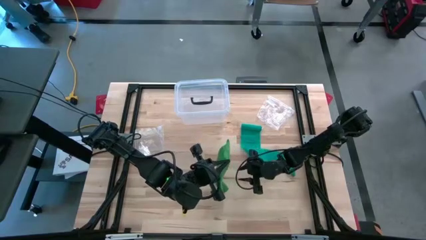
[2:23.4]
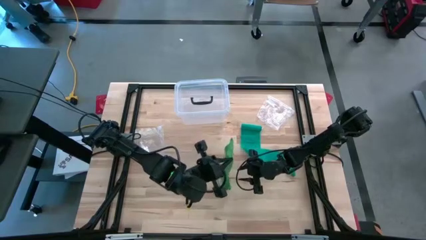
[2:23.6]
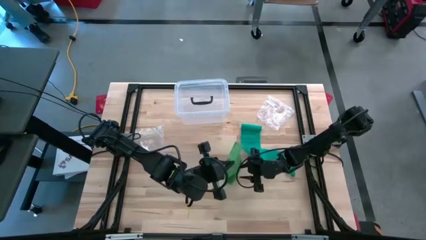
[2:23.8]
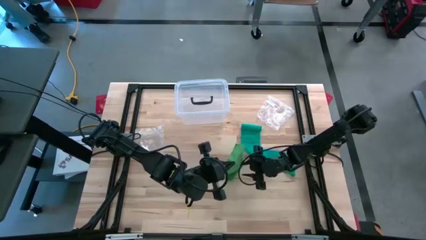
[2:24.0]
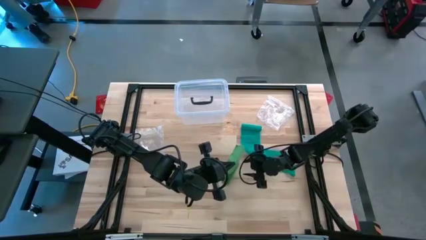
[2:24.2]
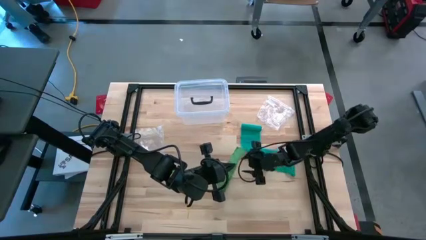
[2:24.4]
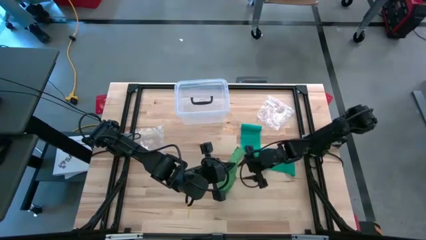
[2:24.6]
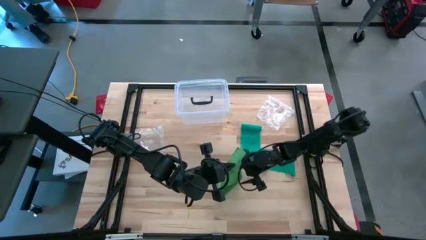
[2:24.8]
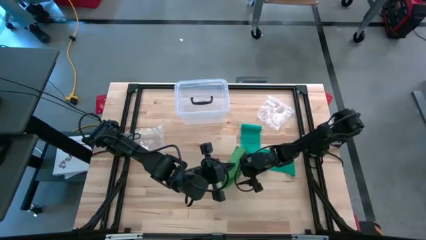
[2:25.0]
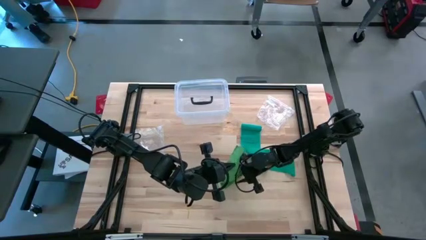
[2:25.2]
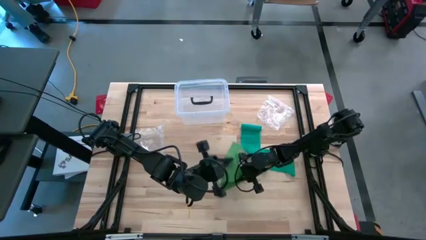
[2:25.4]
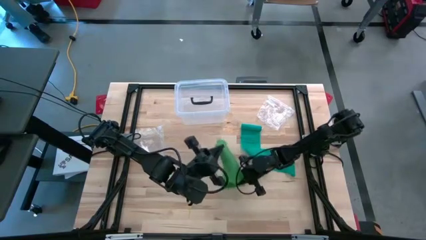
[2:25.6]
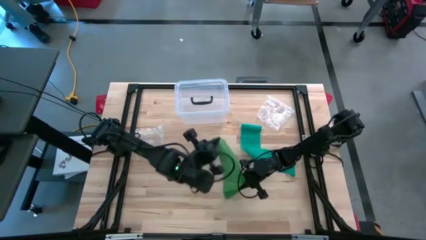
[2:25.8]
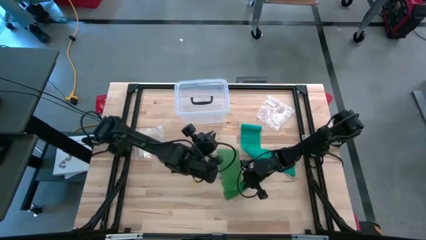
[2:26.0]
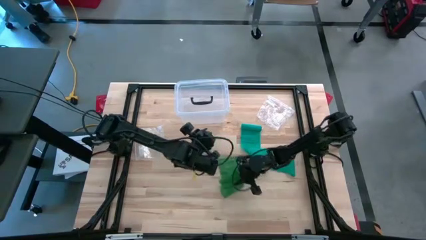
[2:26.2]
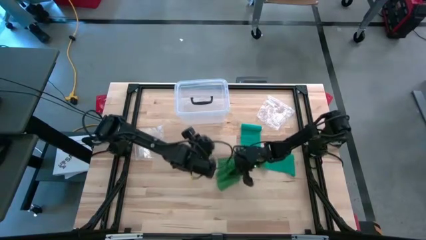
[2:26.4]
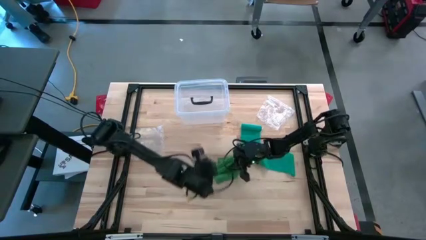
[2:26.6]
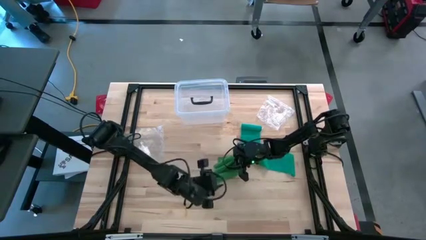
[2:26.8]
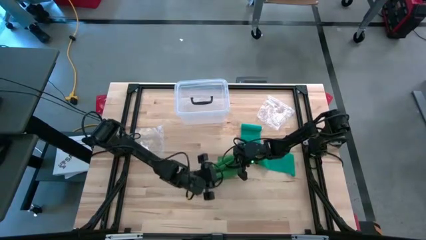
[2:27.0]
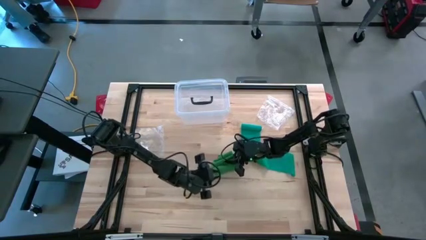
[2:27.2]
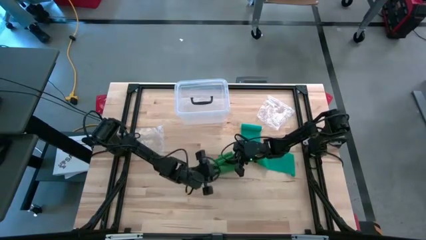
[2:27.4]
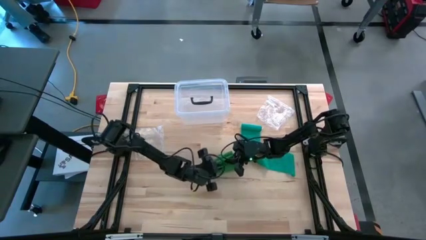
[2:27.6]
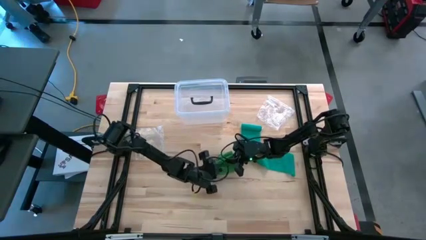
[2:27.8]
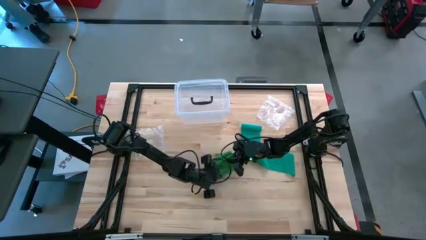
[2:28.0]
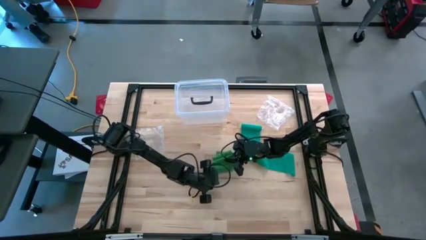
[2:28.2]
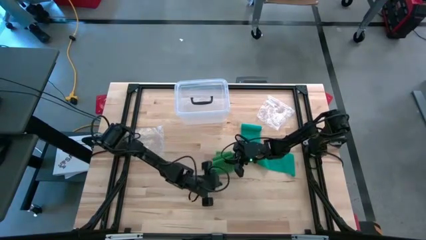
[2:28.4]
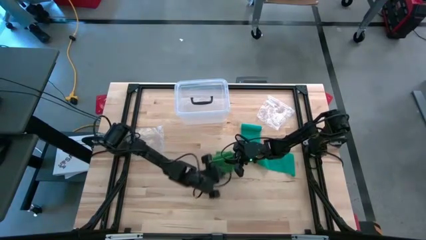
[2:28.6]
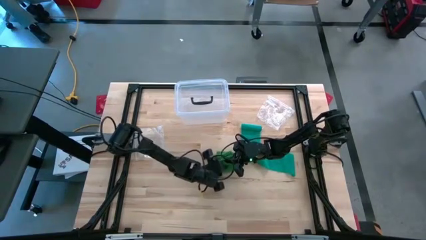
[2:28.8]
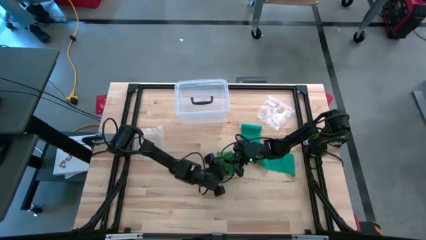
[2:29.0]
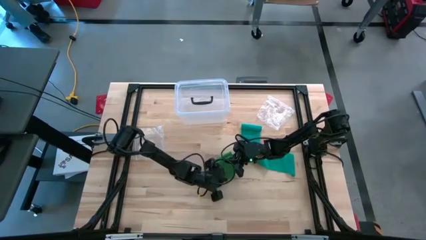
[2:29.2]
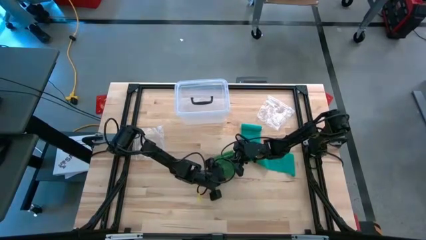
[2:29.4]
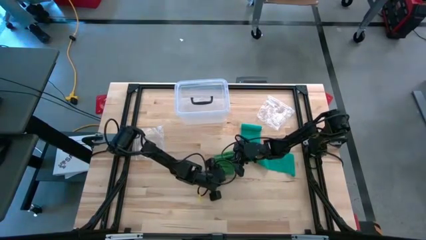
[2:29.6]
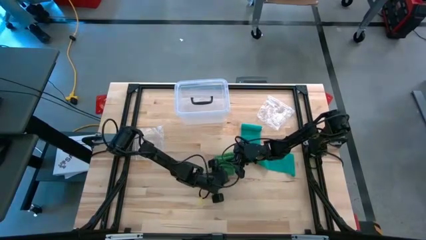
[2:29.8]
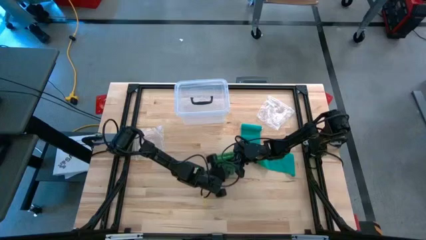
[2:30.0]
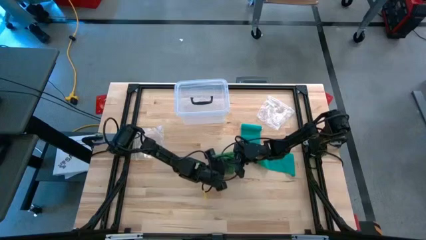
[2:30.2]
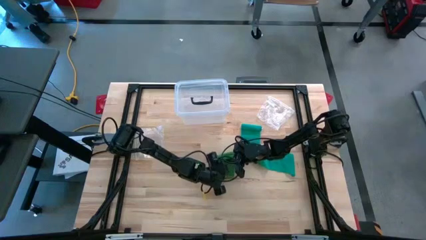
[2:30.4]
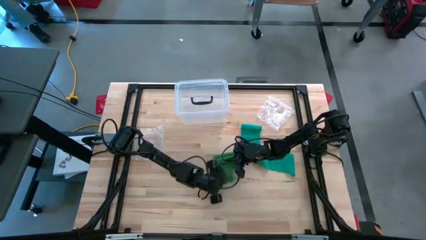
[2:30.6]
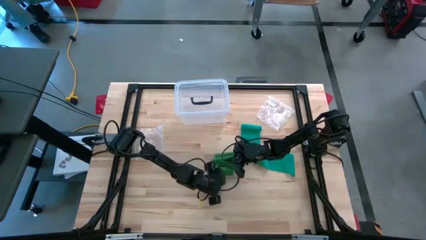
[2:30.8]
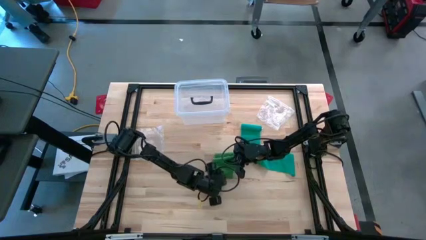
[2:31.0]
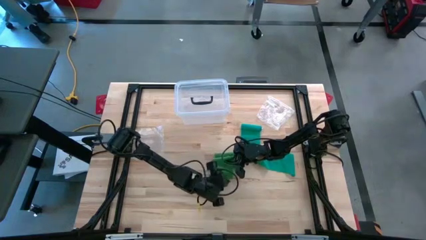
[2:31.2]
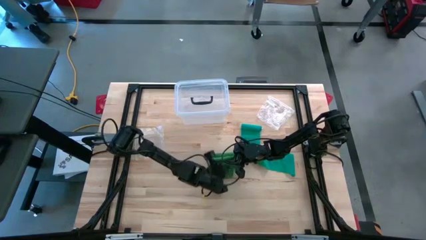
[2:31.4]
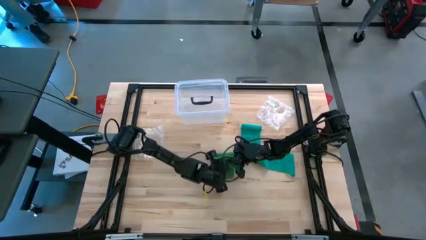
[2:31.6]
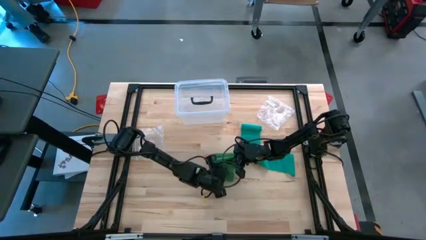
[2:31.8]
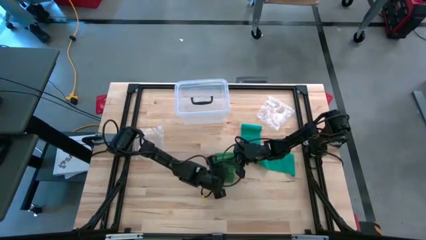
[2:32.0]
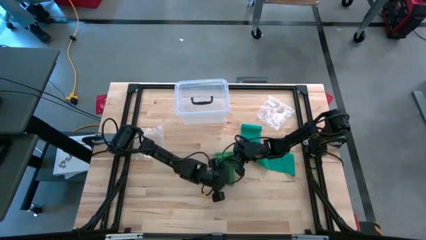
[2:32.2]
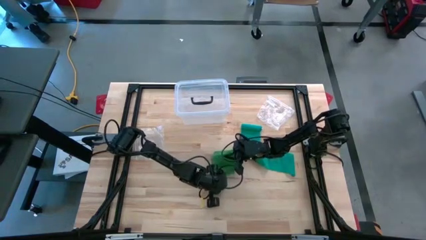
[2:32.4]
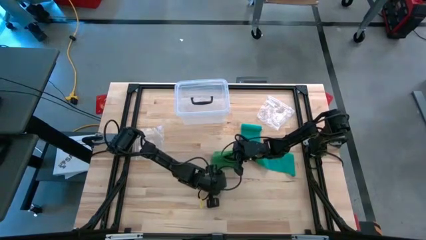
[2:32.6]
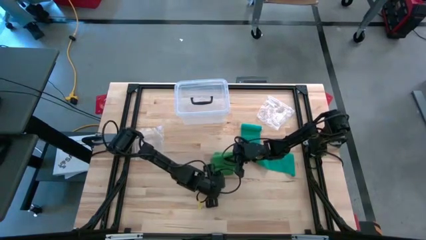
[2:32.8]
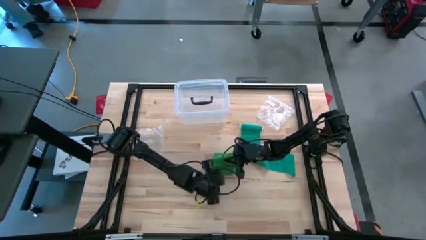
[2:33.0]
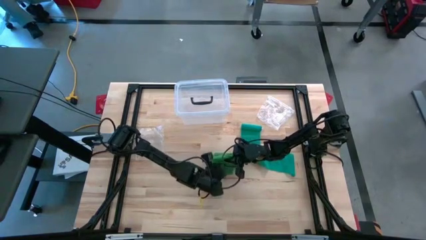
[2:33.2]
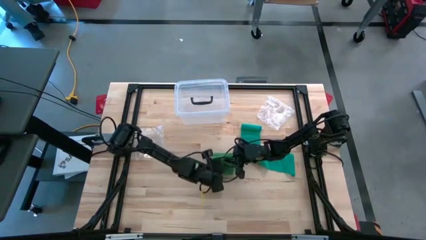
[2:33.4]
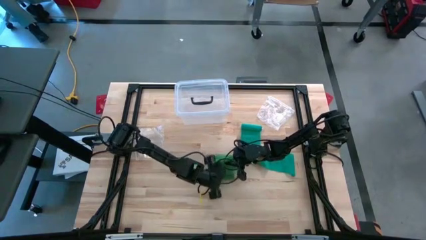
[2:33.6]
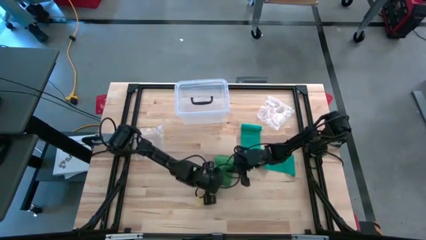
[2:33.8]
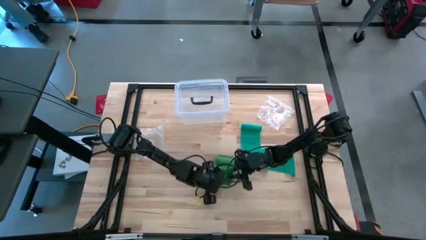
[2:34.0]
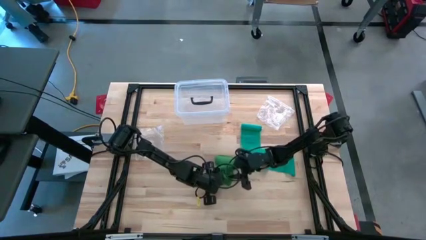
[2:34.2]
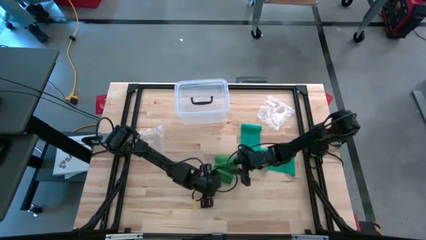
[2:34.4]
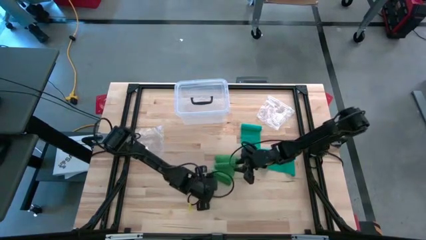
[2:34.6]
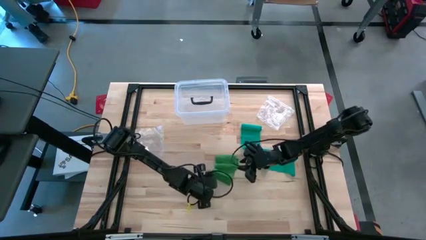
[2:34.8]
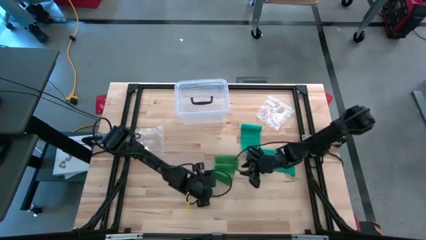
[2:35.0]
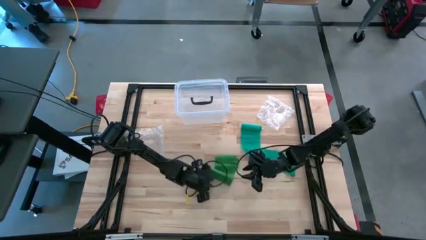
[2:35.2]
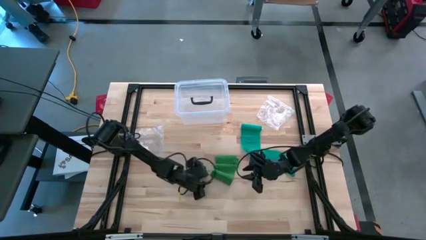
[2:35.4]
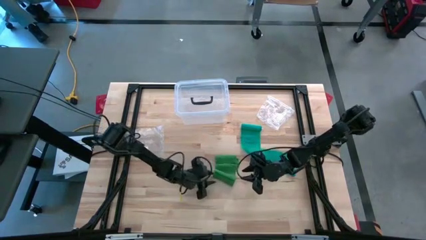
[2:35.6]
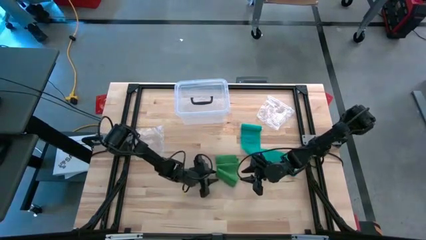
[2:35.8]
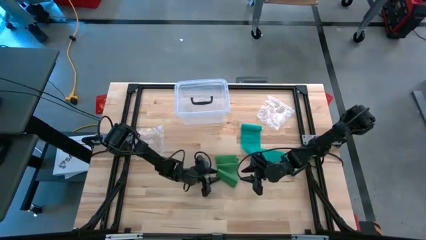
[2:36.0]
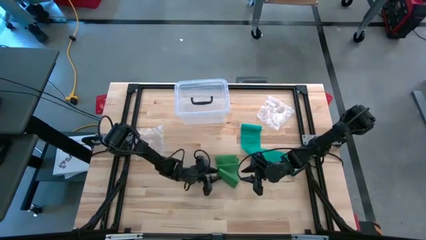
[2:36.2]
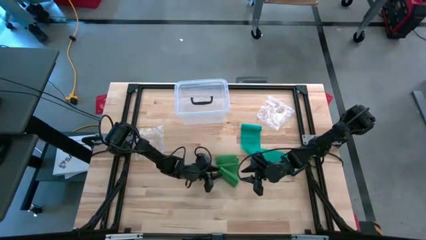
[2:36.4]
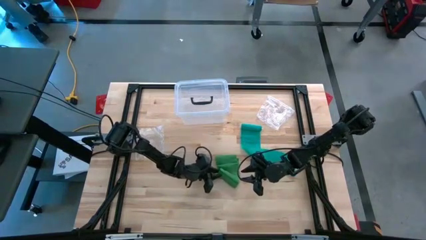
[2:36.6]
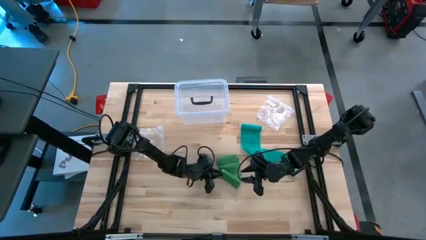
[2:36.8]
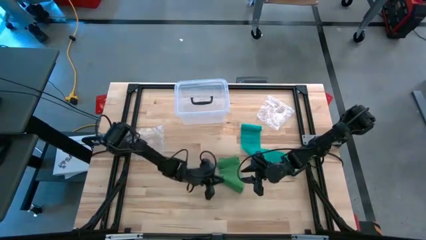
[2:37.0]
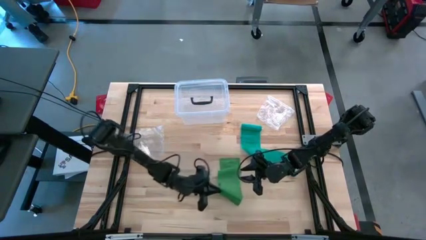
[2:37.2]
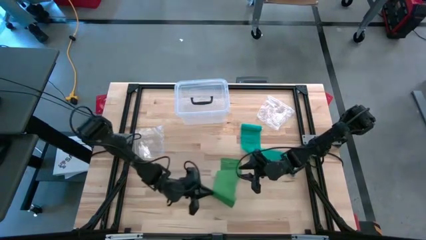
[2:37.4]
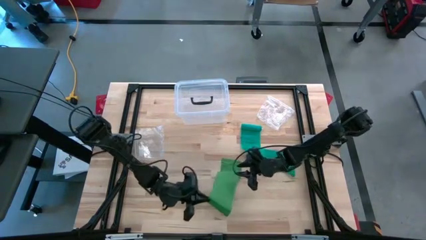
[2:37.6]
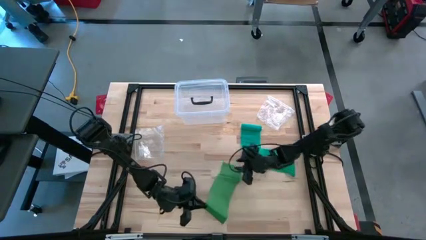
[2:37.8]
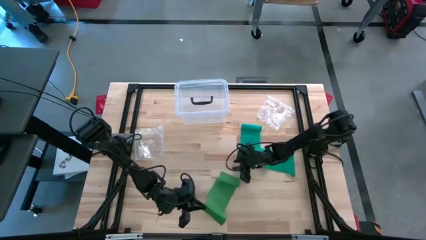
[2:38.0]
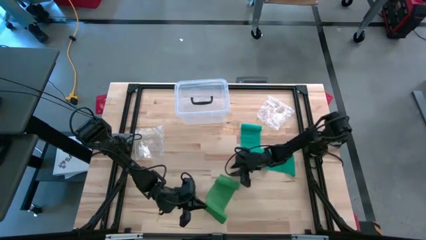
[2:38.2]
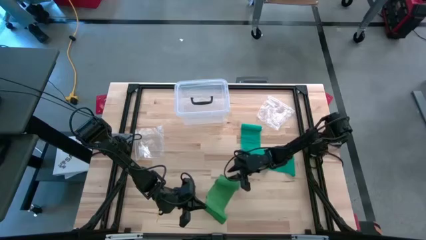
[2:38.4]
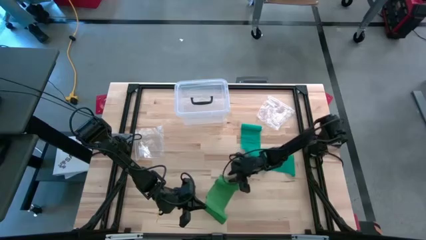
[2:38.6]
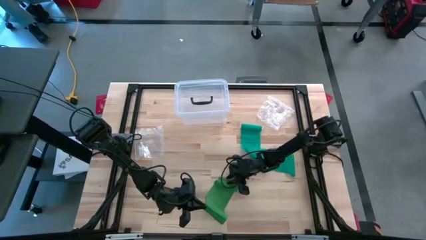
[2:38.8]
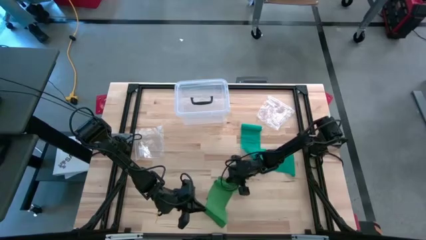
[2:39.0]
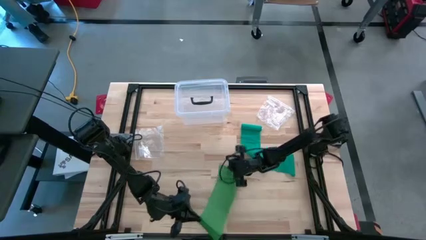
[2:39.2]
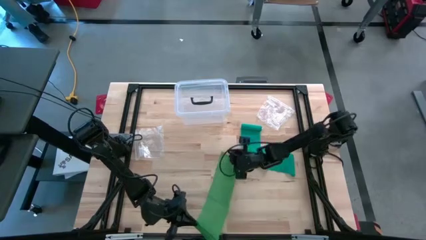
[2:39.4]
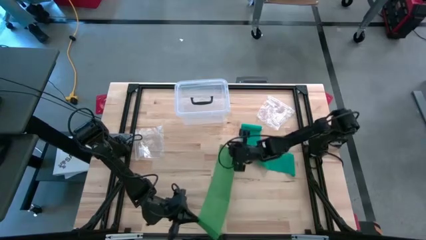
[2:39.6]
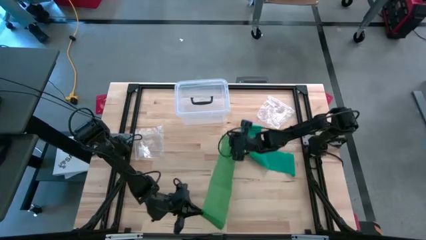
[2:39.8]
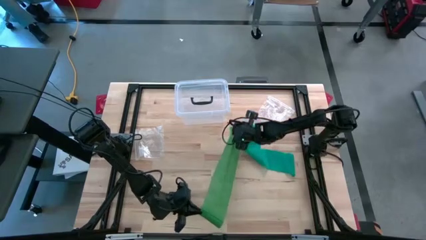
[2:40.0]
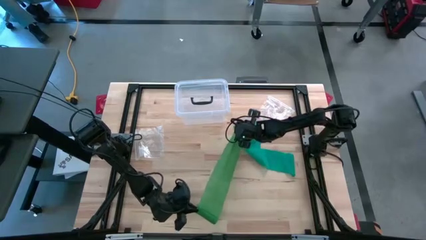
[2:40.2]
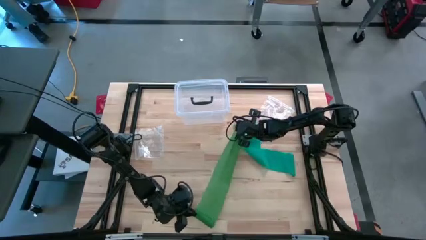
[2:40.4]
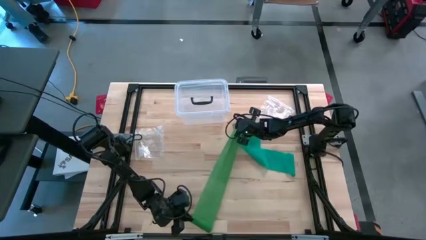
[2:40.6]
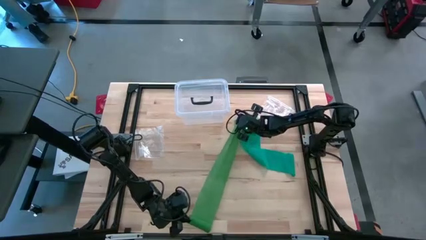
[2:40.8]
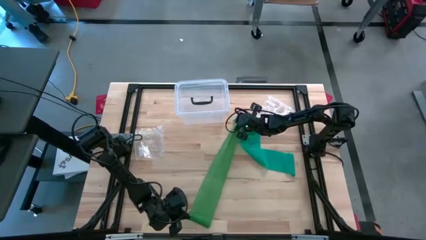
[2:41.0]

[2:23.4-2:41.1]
Task: Roll bandage
Roll the green bandage
